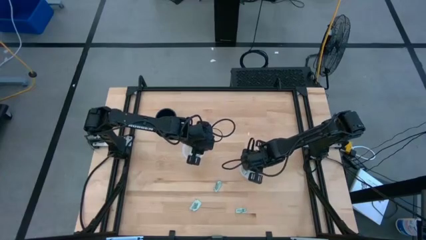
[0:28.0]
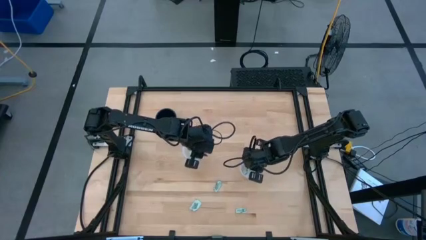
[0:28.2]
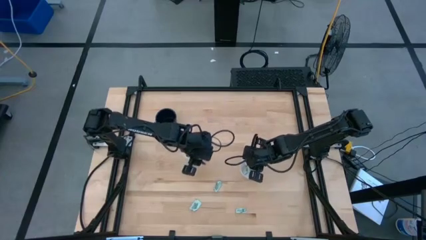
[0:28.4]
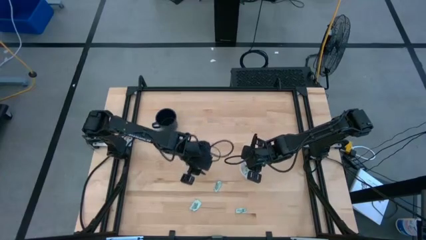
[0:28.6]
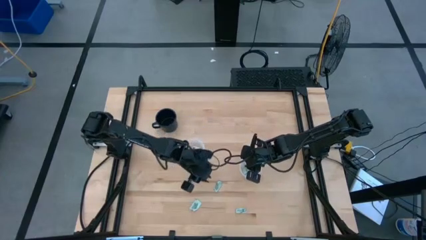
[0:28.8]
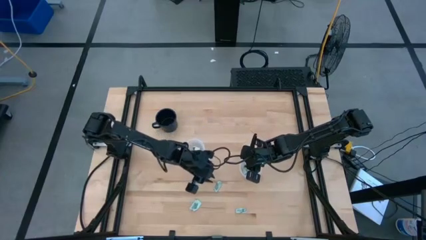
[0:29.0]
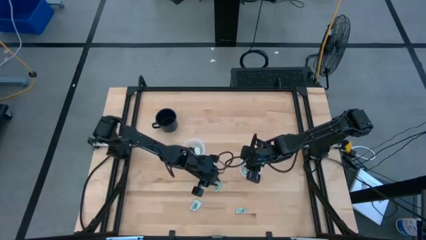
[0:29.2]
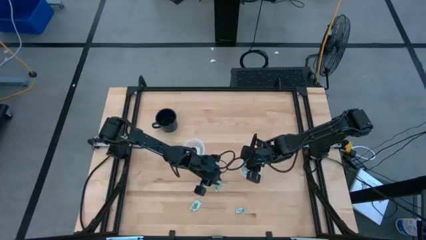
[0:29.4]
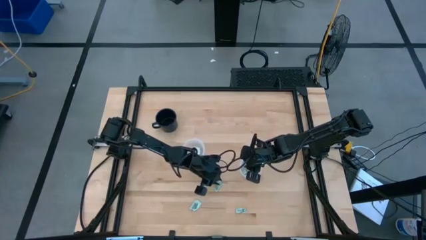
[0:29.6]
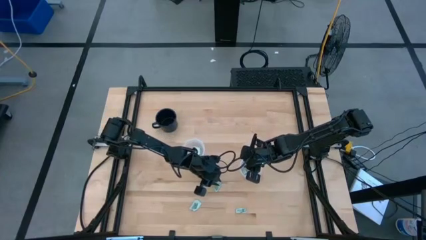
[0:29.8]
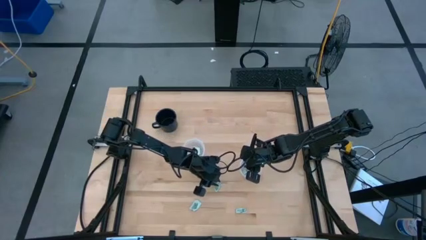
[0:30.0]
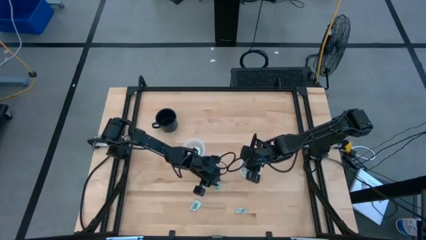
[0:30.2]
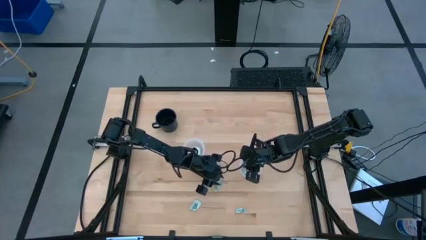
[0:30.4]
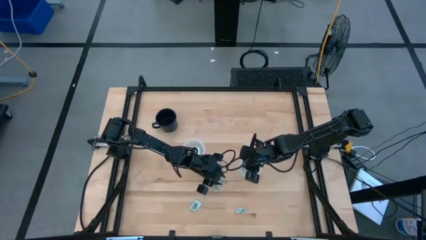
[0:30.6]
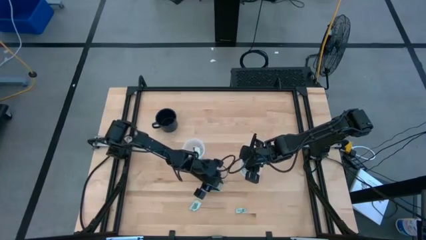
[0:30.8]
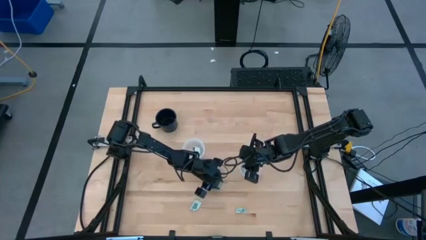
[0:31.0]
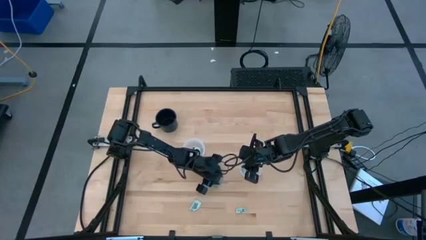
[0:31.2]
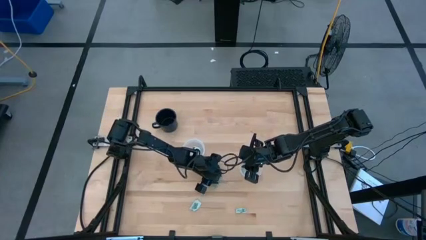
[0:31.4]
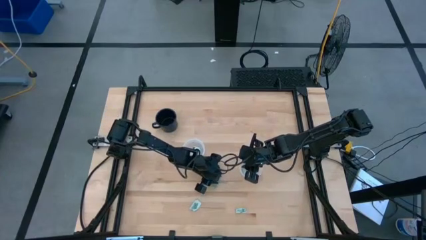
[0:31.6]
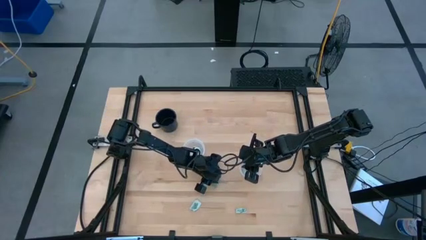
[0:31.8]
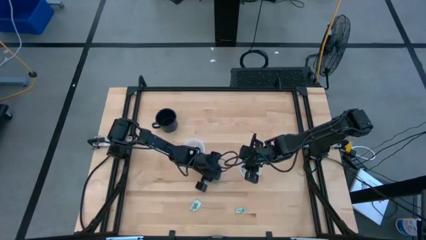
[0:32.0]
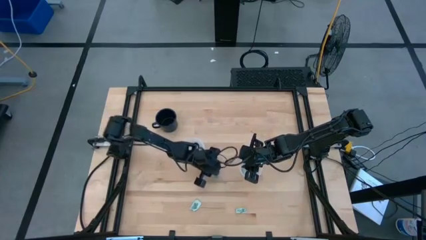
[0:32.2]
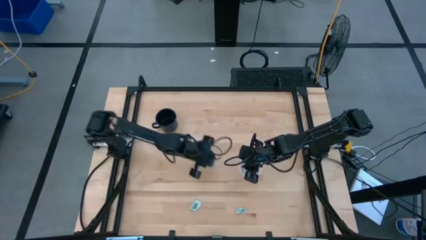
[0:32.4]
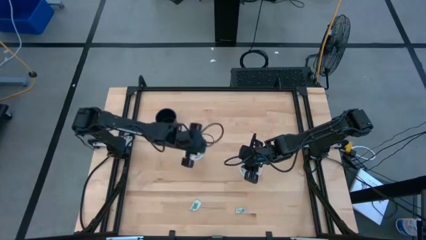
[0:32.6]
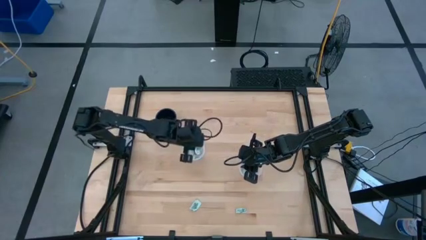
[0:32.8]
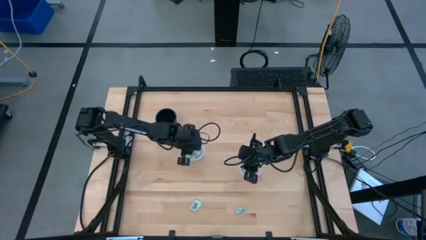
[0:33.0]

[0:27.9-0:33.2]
Task: Pick and place Stevia / Truvia into bins
Put the green stevia packet into the left transparent container

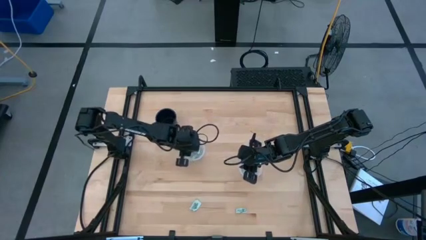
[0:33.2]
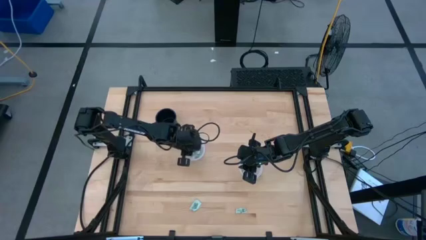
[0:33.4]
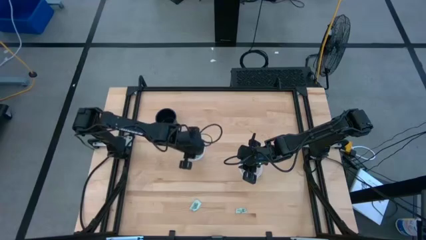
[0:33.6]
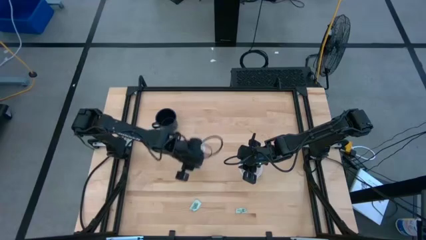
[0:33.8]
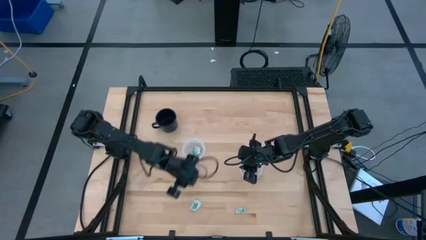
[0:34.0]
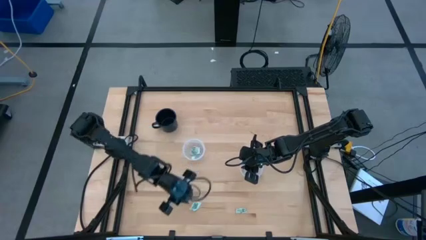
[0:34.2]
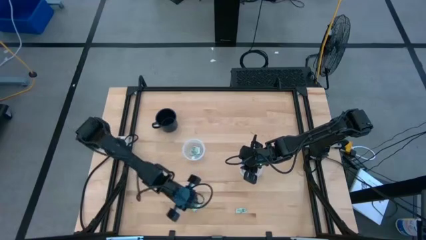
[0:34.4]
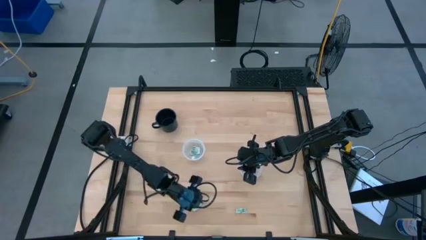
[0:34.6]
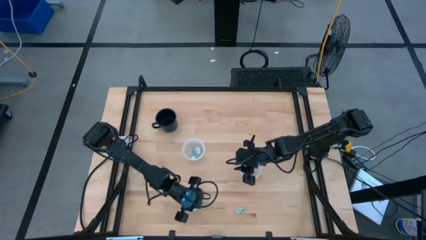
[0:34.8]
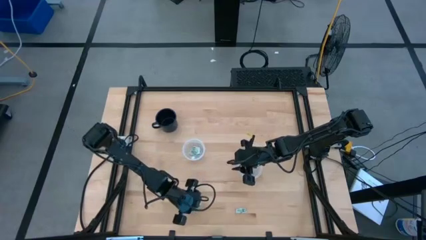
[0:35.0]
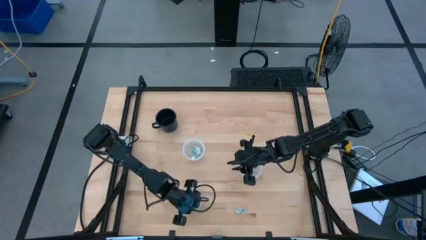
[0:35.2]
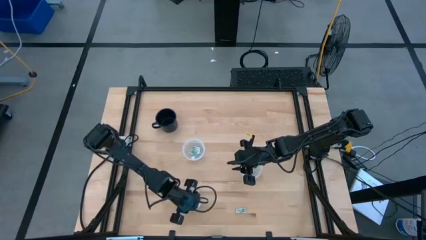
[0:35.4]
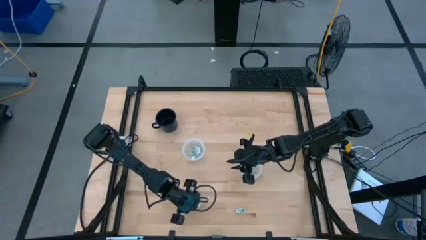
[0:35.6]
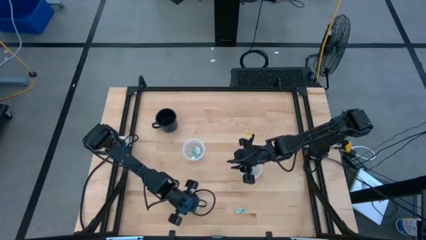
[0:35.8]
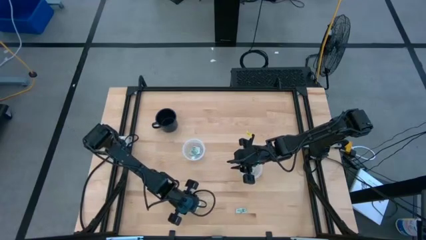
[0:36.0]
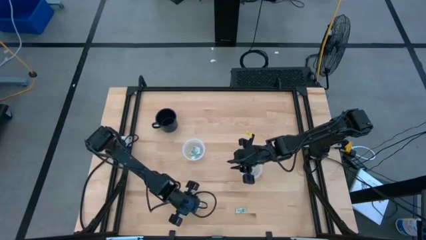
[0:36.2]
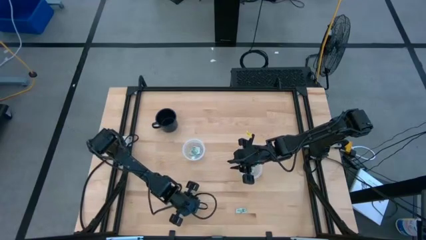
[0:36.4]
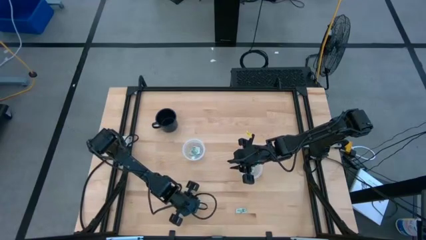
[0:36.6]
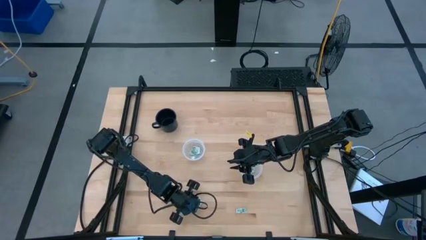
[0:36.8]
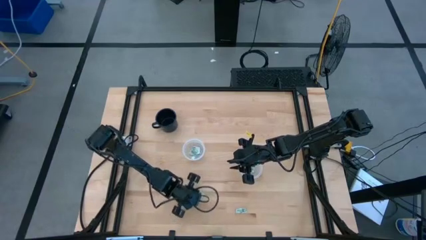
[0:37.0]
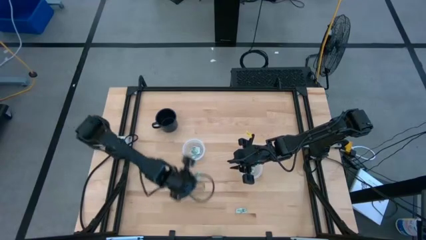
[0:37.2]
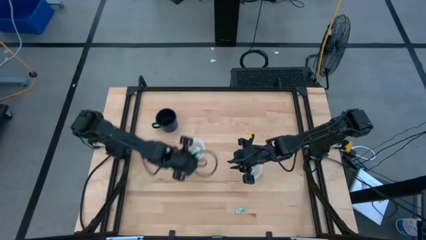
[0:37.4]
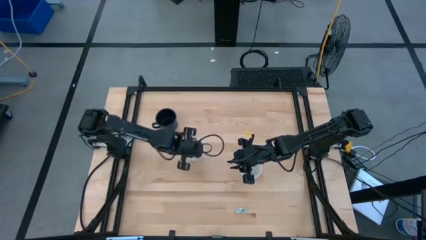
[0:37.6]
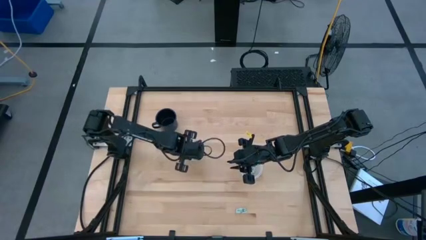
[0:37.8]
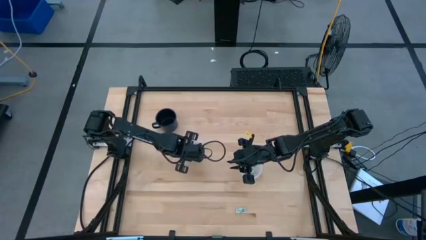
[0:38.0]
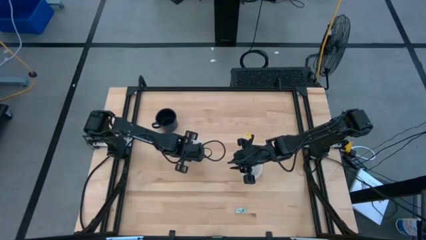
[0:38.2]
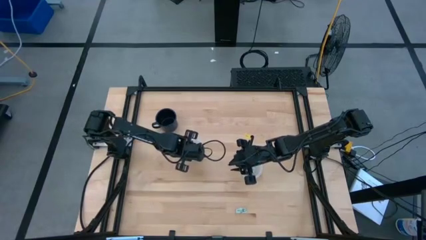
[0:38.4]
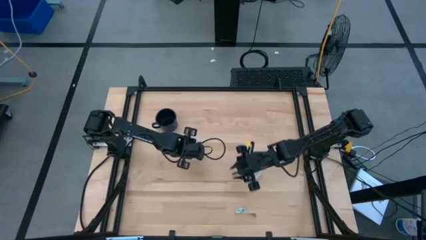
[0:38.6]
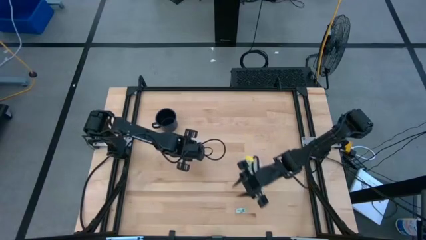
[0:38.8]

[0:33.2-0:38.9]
Put the green stevia packet into the left transparent container

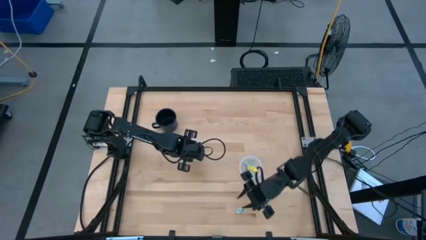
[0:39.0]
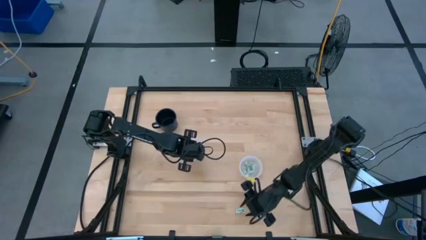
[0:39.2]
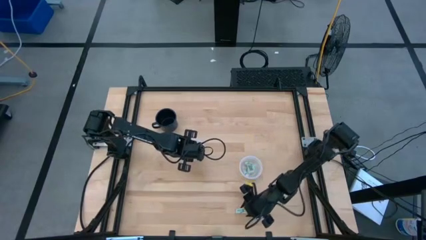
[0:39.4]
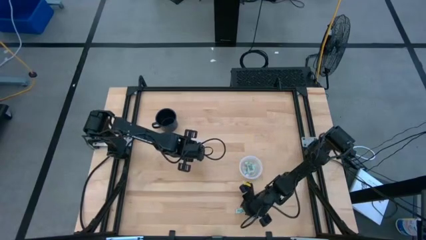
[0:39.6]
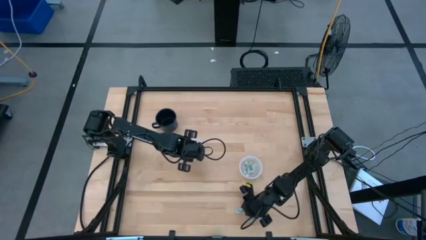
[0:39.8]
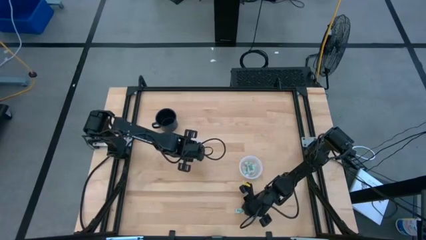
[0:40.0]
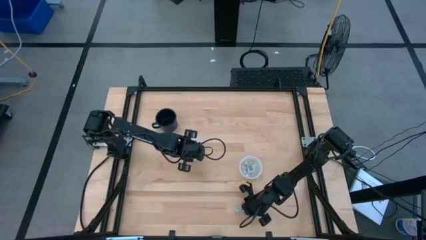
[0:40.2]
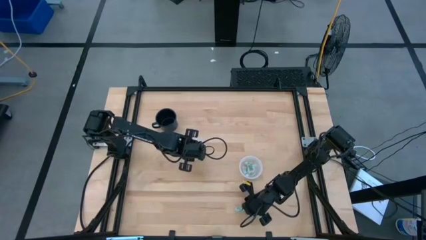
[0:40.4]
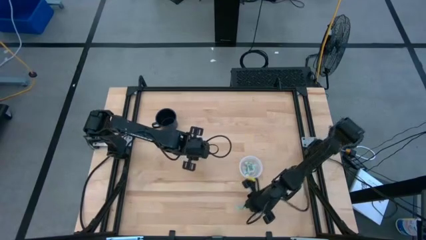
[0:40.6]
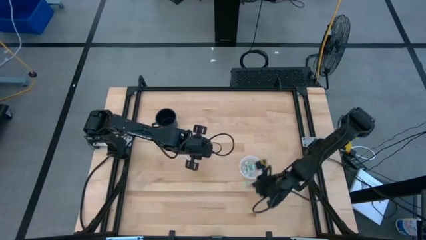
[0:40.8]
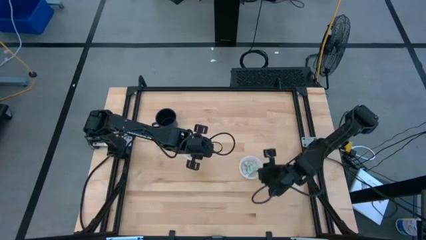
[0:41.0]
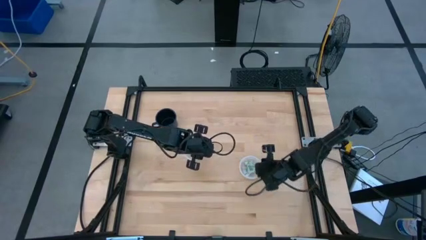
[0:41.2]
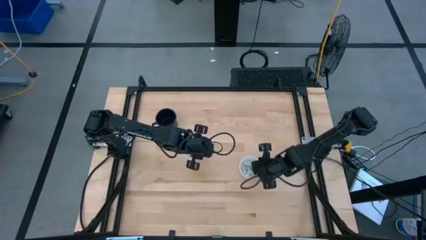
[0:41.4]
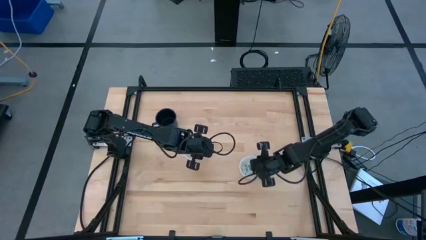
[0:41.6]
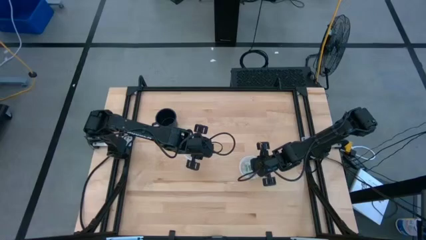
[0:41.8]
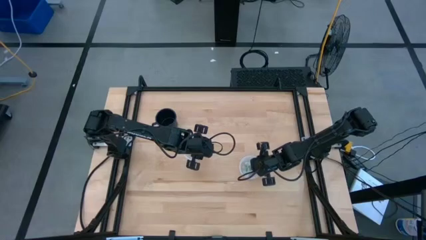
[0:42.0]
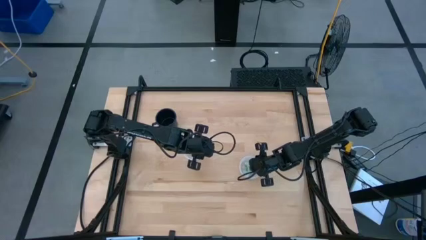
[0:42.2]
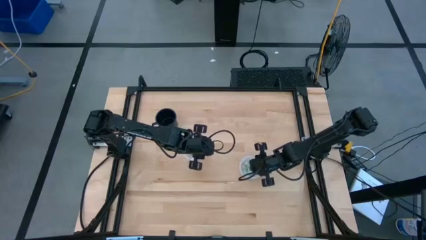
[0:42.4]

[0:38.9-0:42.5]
Put the green stevia packet into the right transparent container

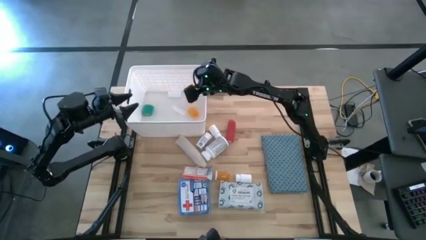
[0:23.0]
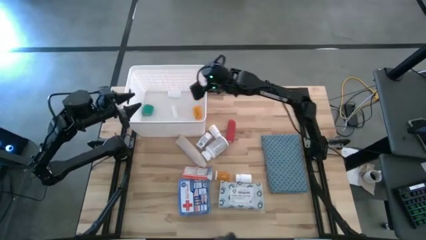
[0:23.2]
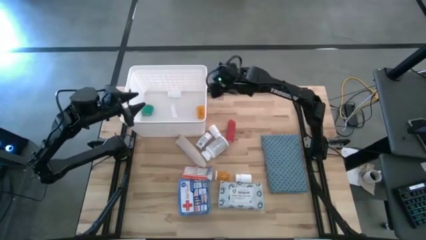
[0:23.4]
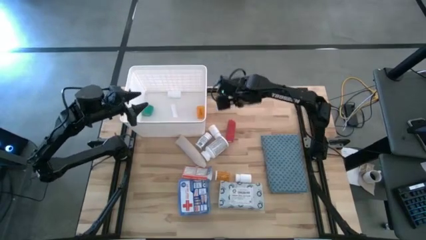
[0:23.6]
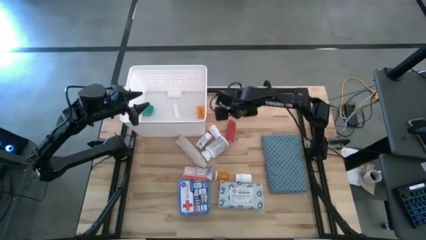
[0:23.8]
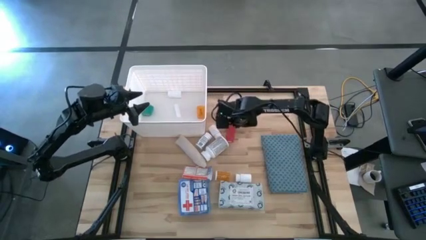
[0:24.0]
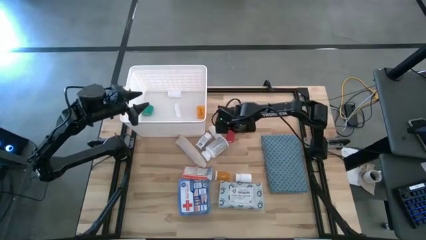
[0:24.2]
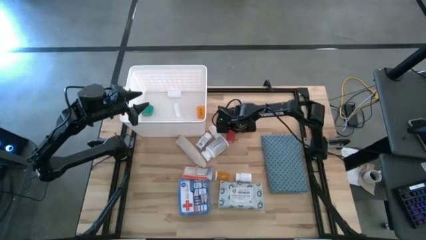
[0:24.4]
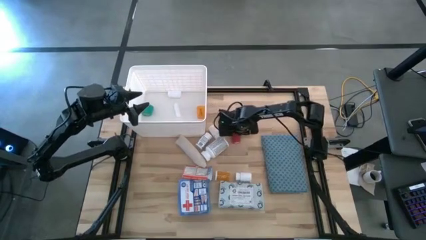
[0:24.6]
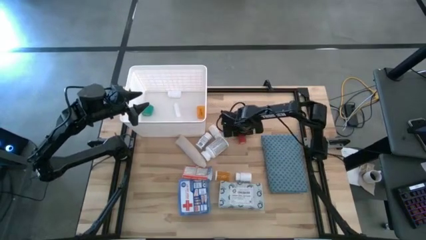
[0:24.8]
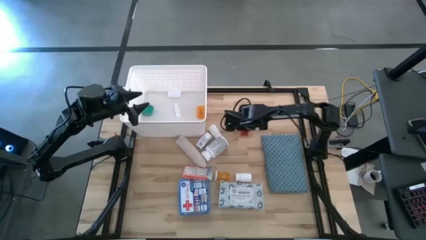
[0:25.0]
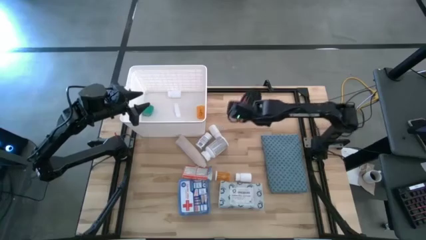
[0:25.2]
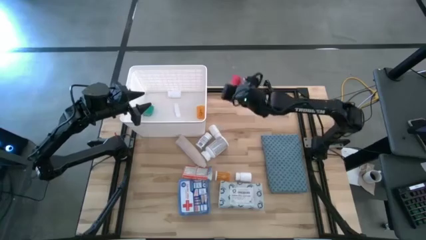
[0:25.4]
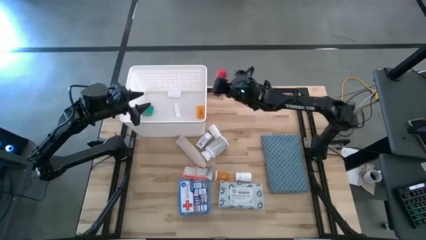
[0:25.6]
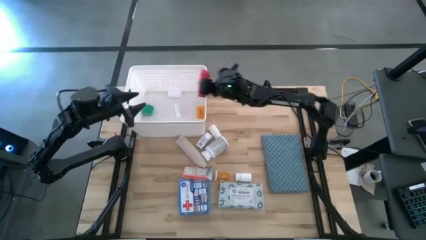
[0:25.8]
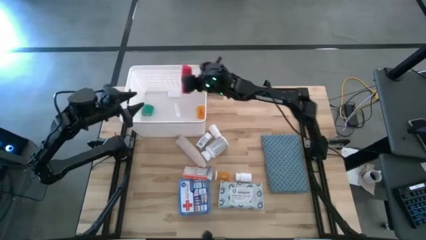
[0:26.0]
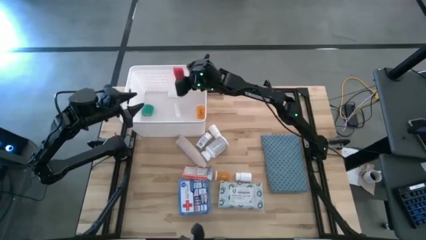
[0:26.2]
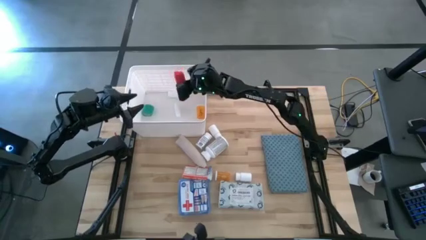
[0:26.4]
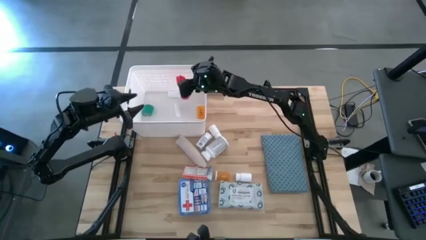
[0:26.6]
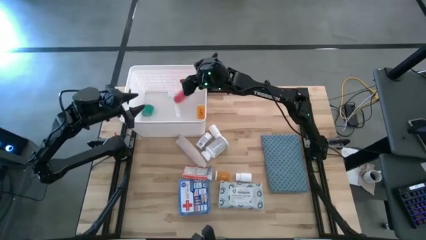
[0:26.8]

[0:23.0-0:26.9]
Task: Pick & place medical supplies in basket/bin
Put the red bandage into the white bin
